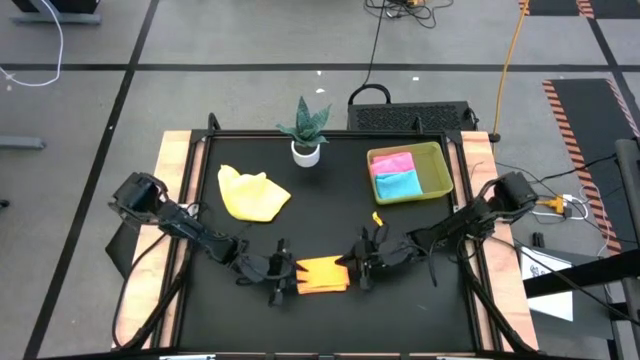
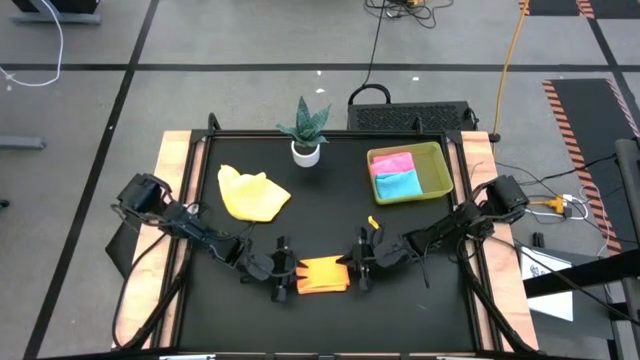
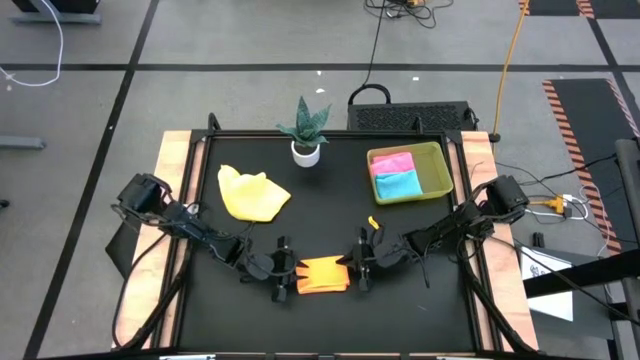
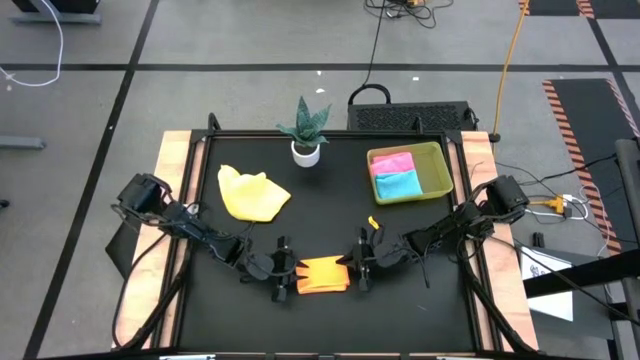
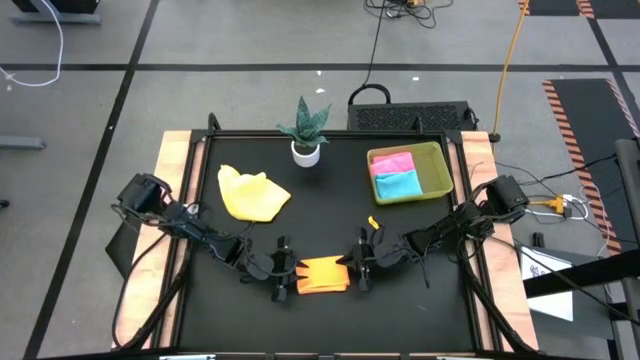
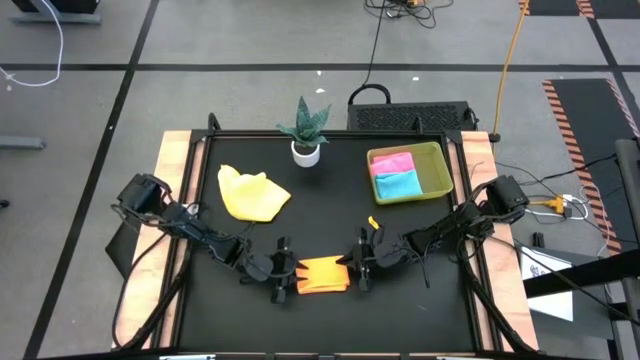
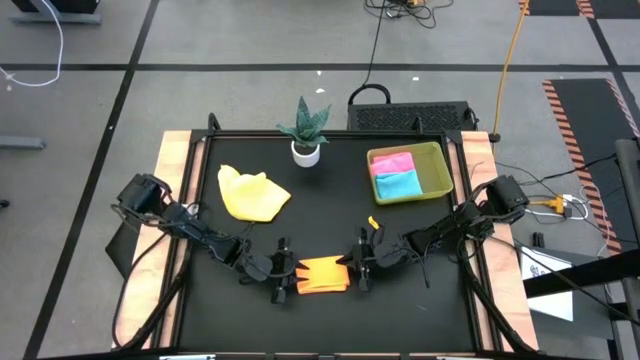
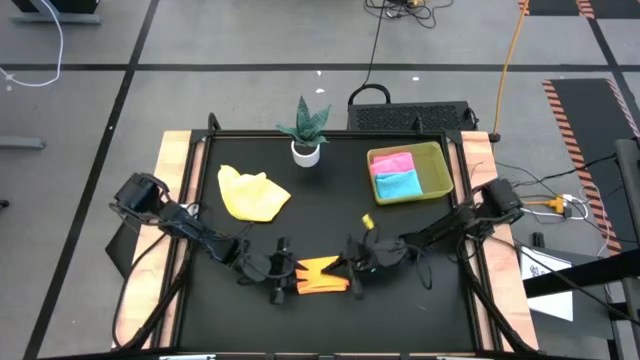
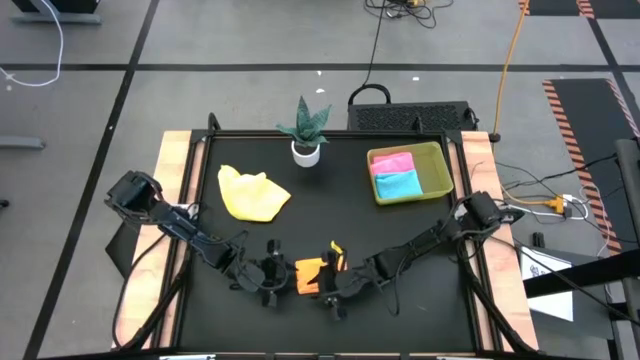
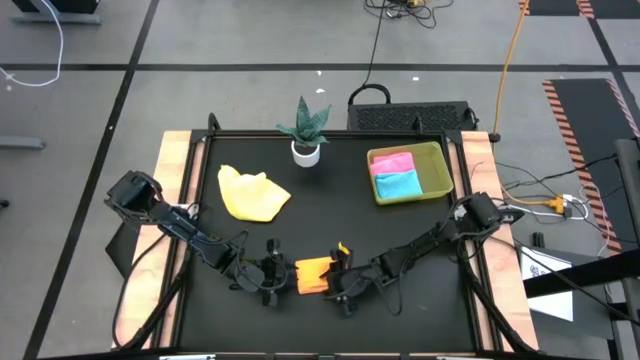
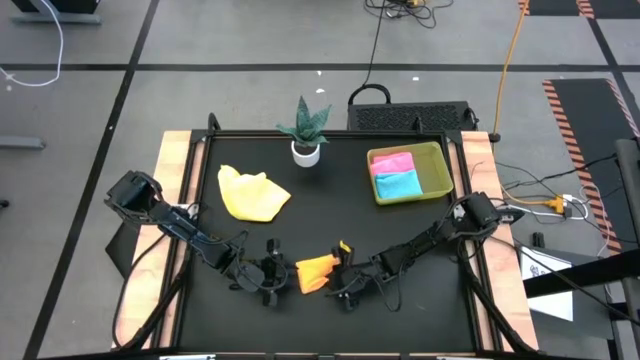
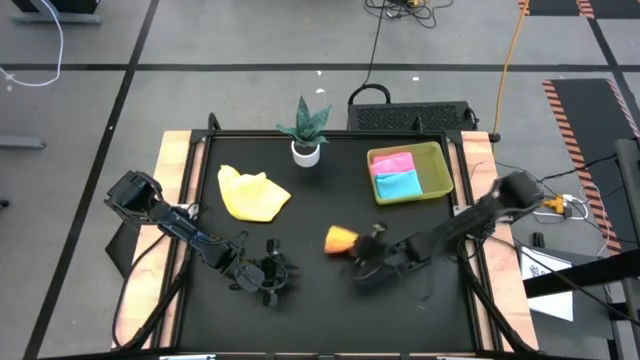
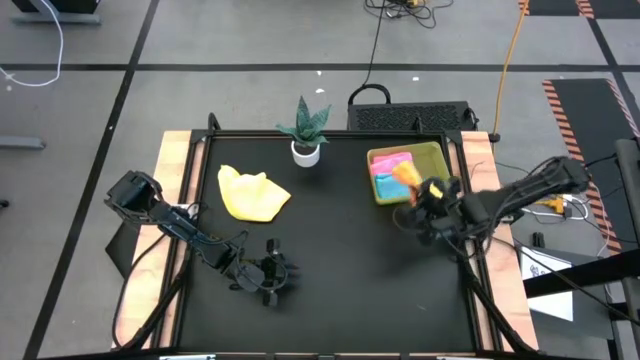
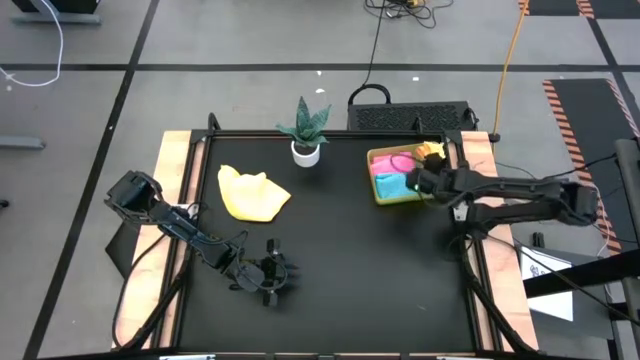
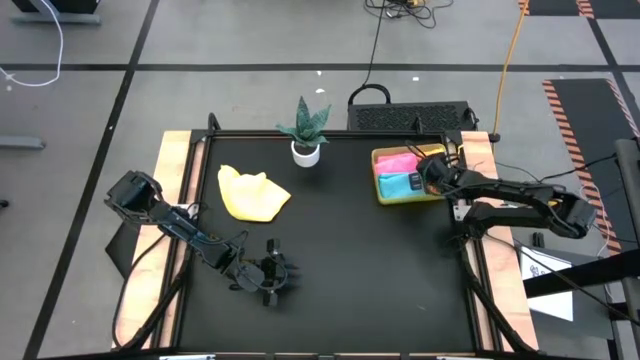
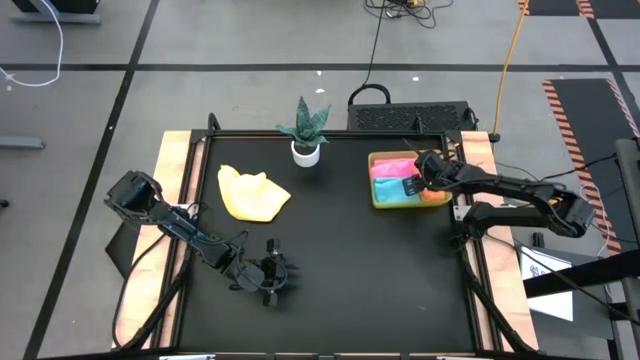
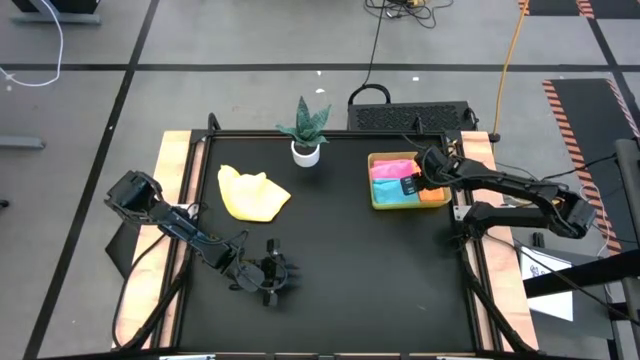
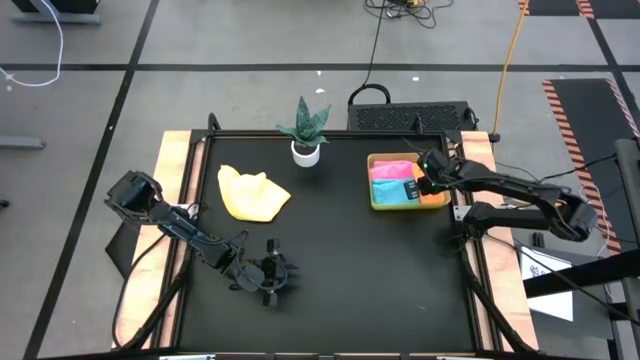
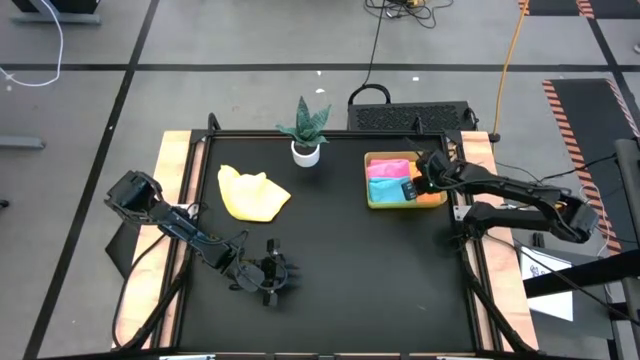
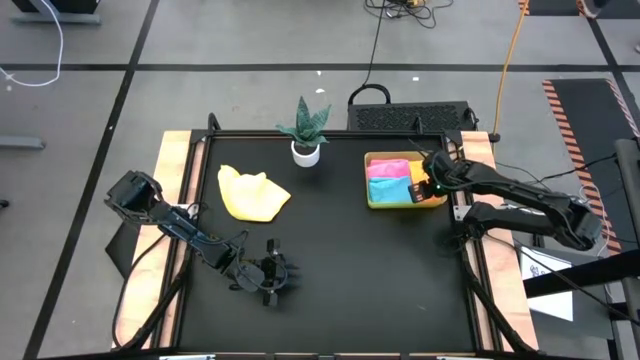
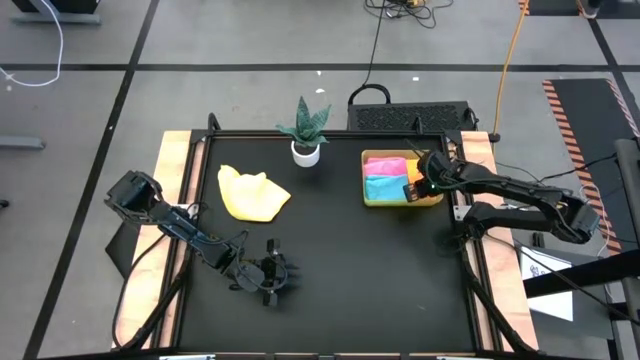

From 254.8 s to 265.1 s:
Task: Fold microfiber towels
Put the folded orange microfiber cloth into the yellow bin

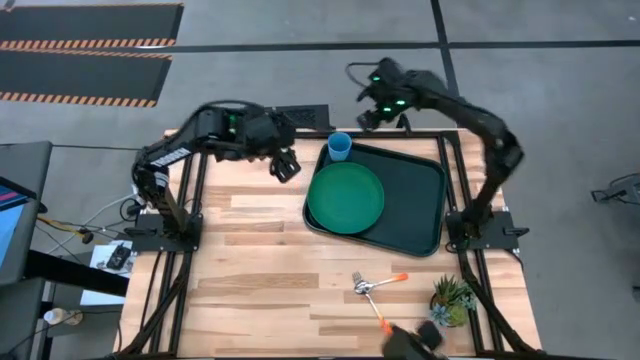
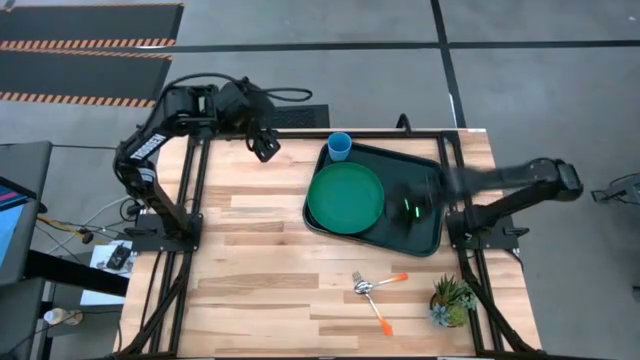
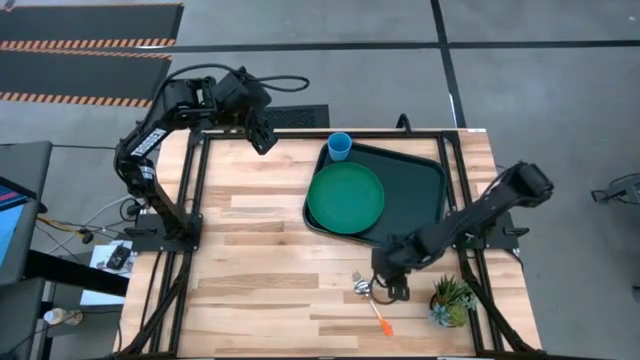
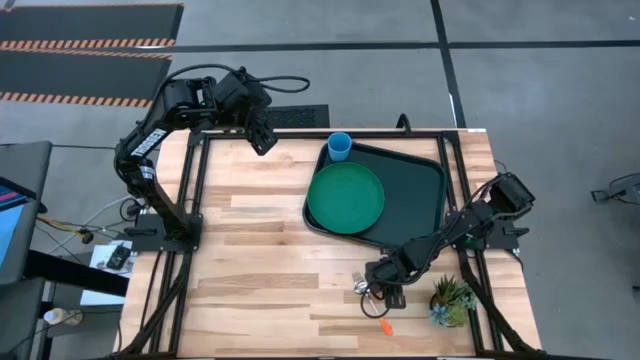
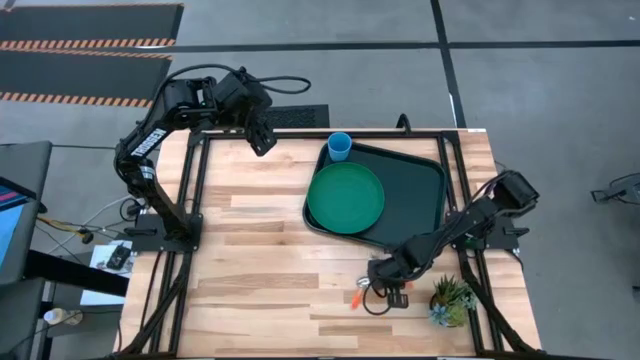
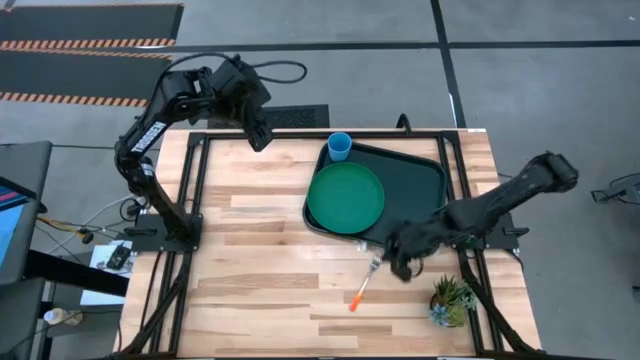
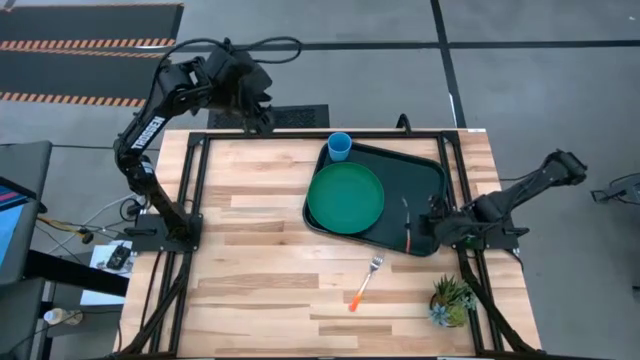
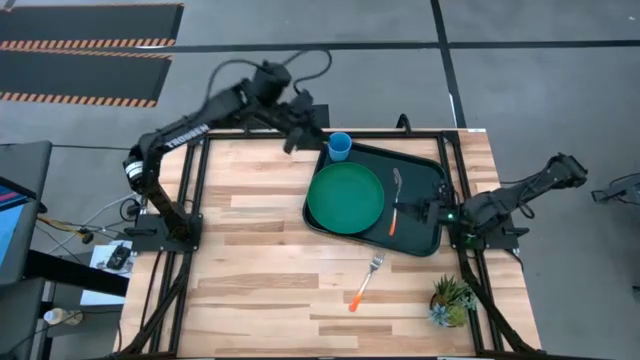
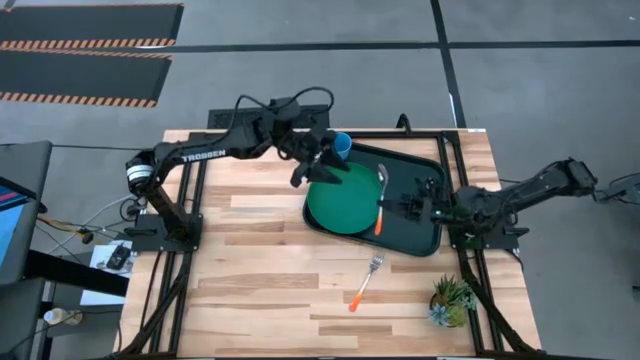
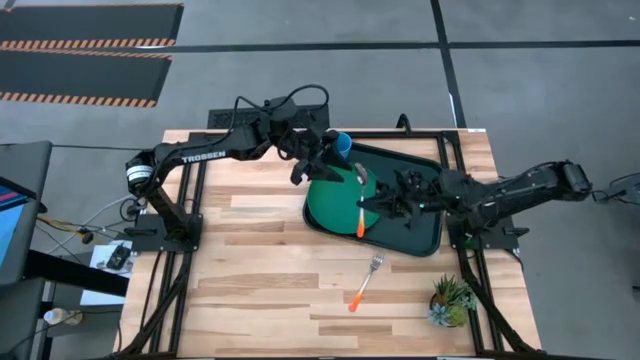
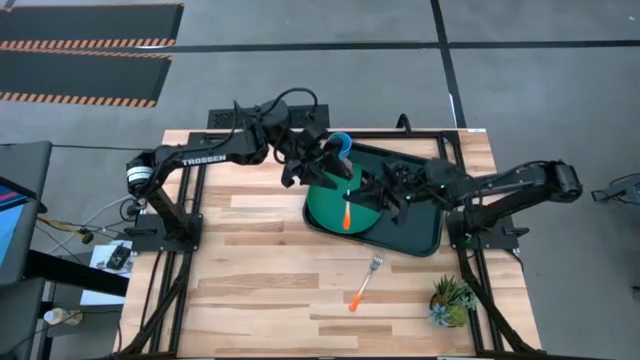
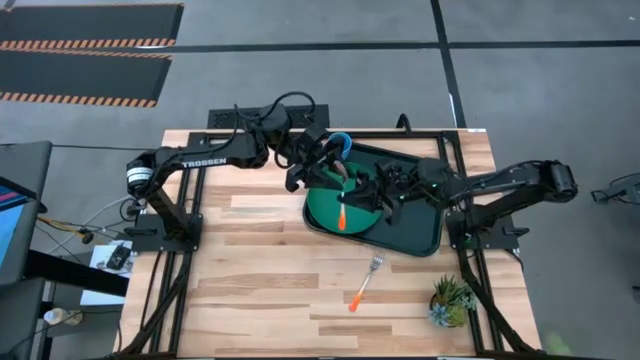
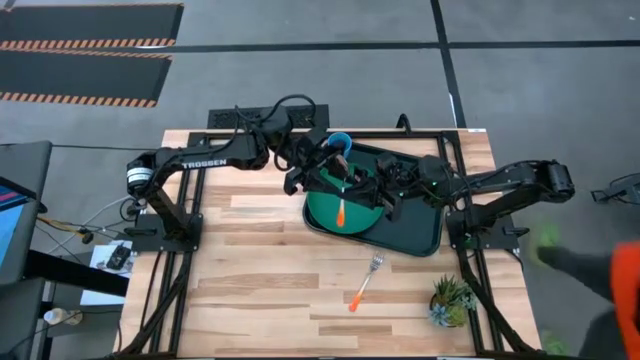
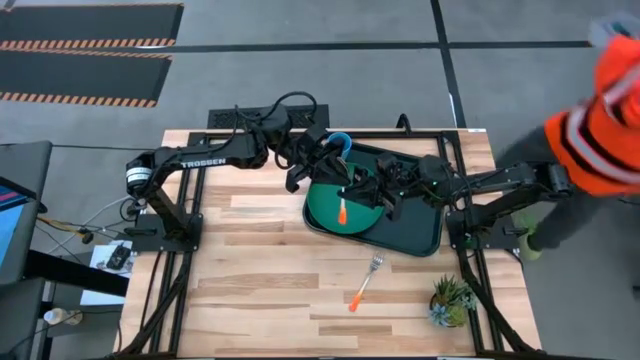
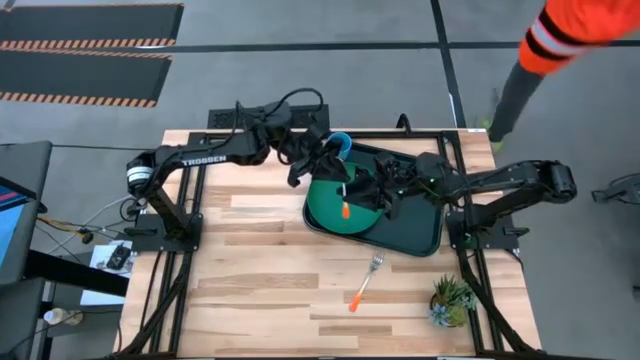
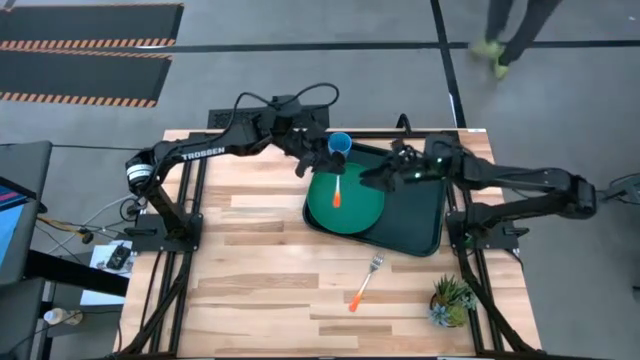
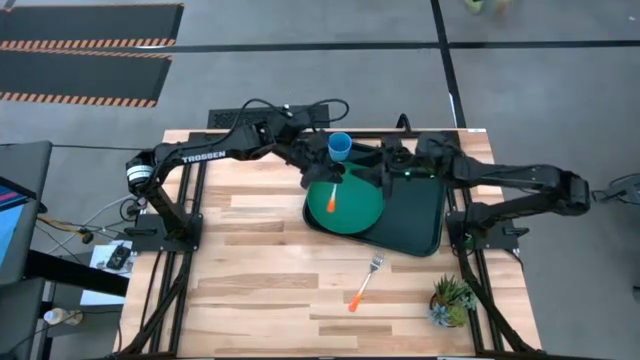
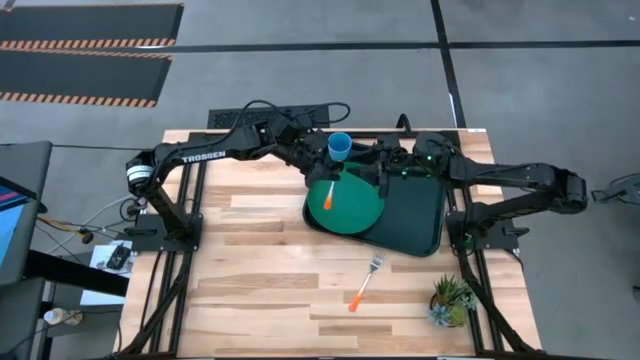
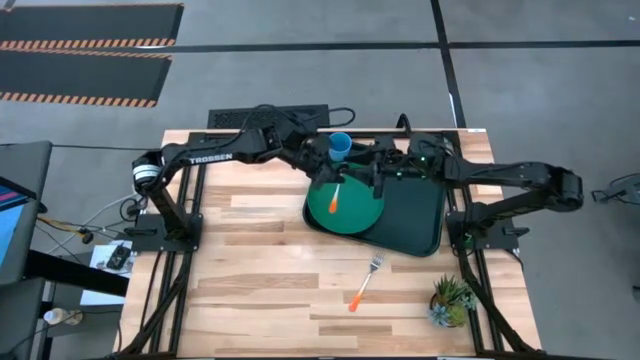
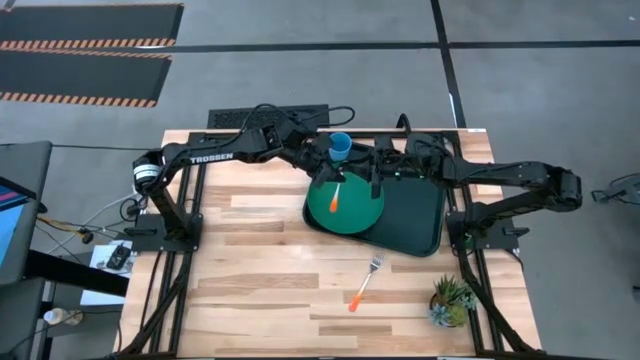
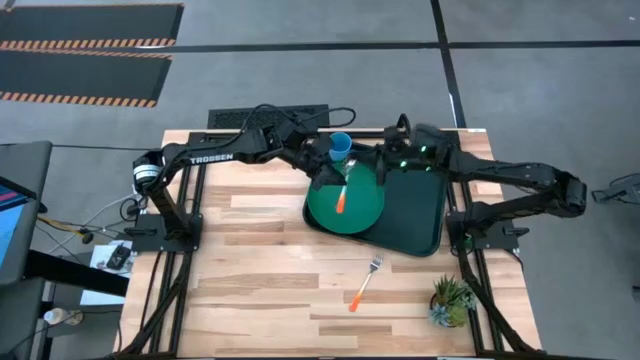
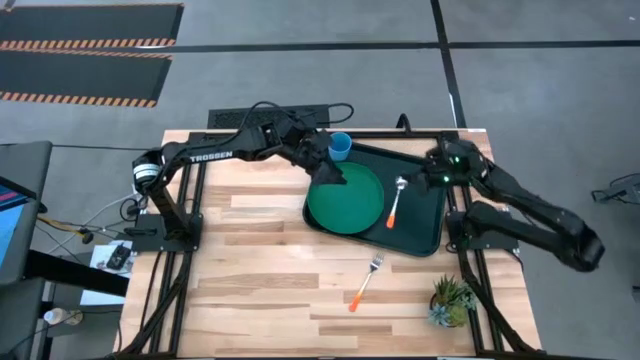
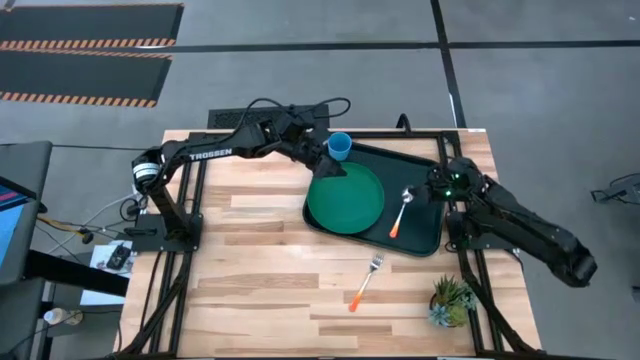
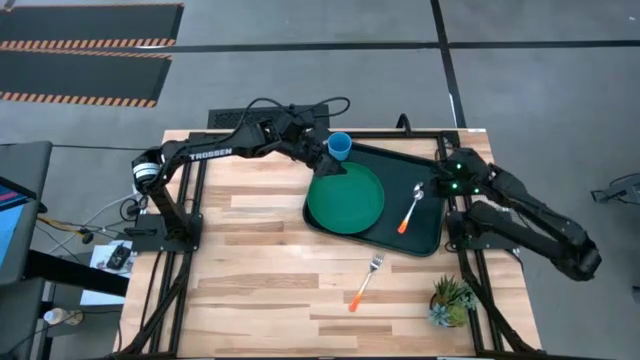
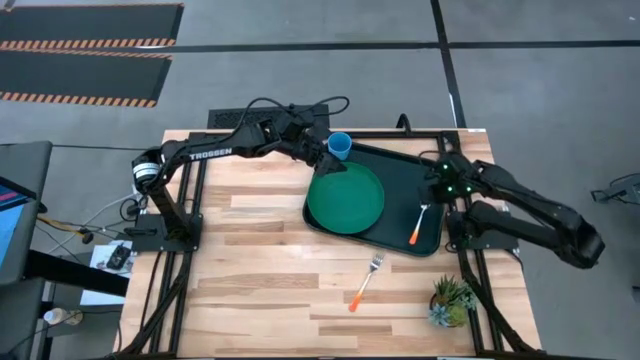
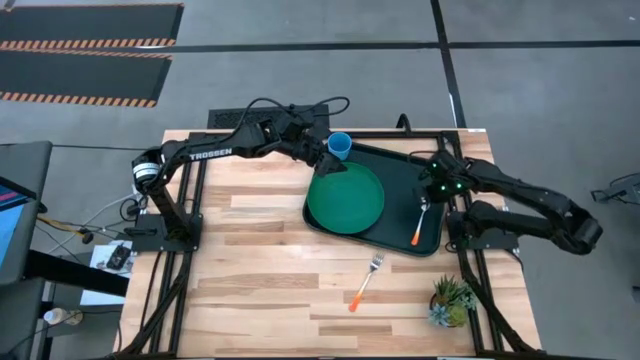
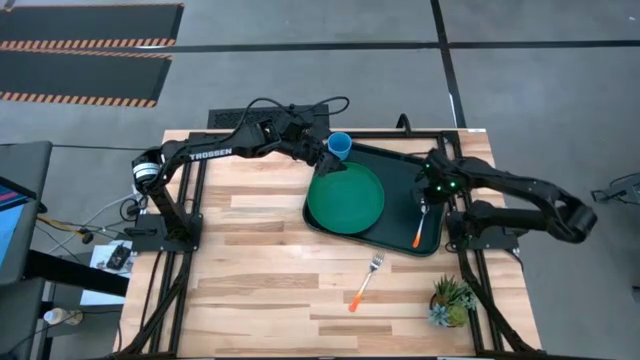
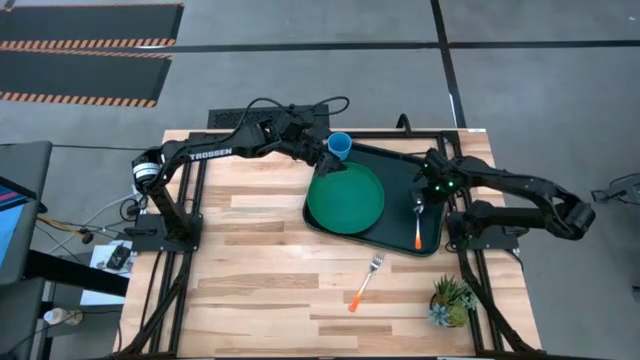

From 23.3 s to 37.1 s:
Task: Pick and place plate/cup/fork/spoon on tray
Put the orange spoon on the black tray to the right of the green plate
